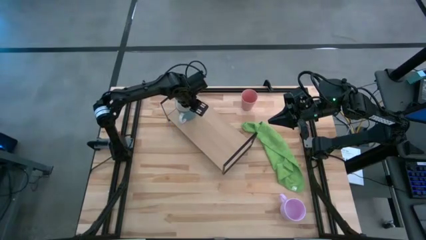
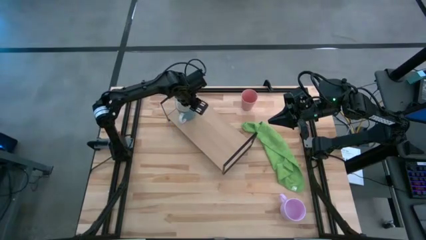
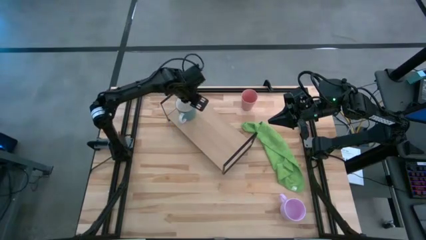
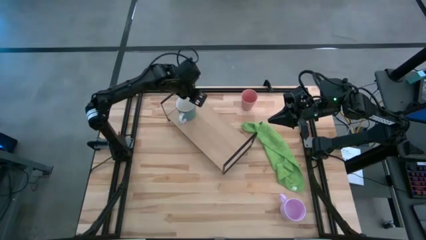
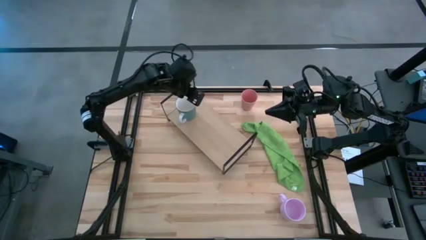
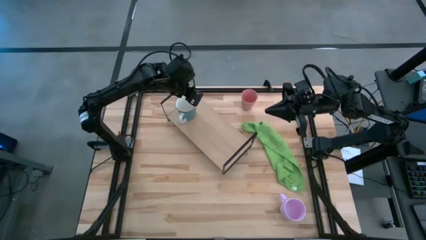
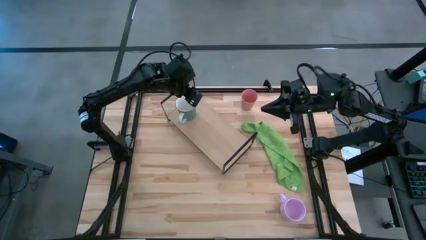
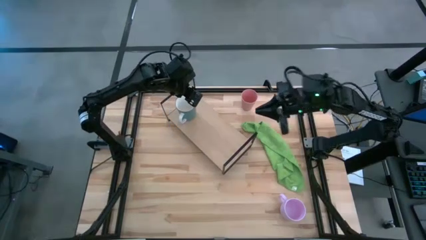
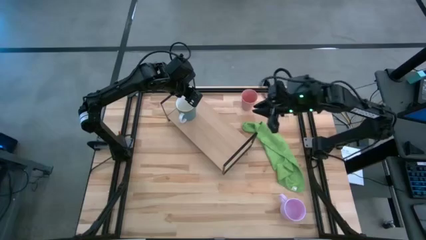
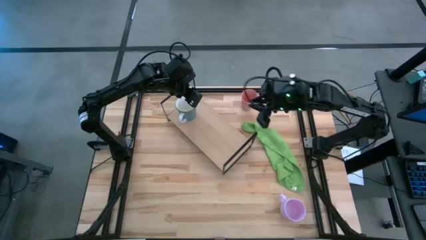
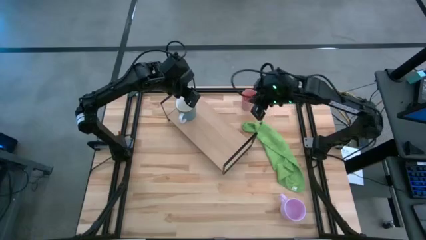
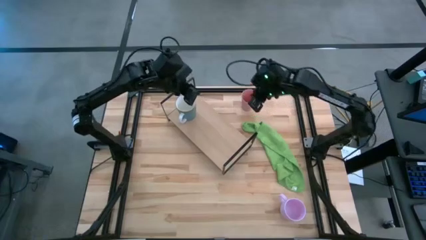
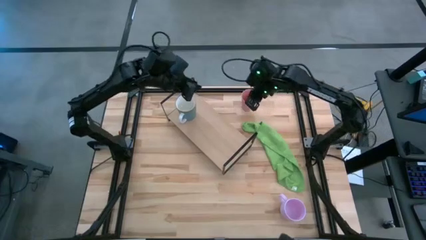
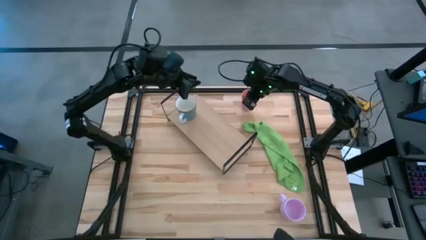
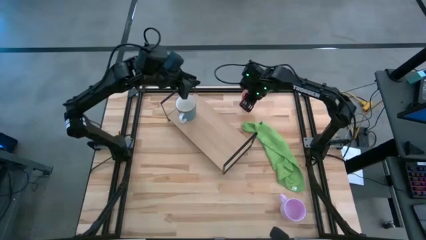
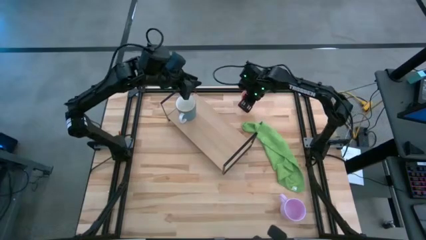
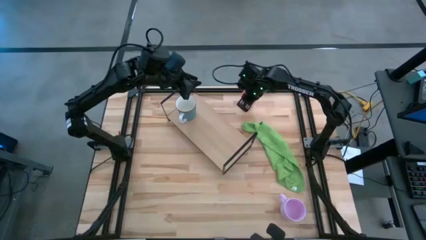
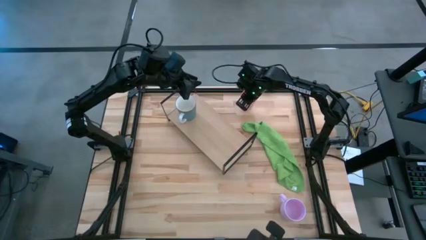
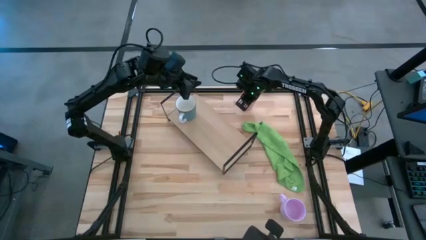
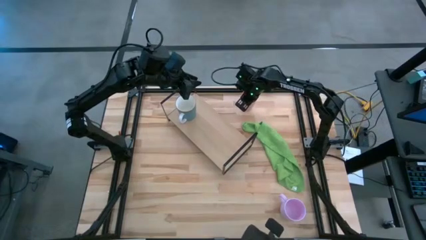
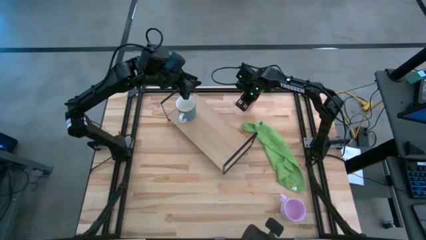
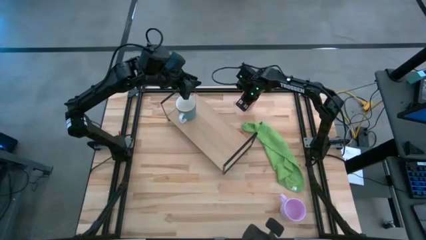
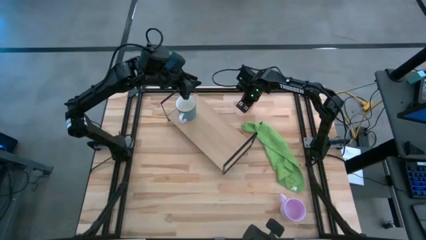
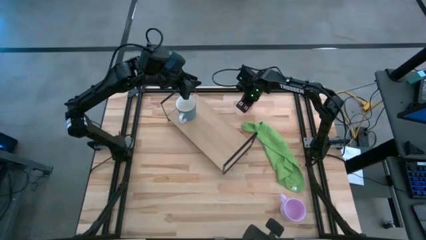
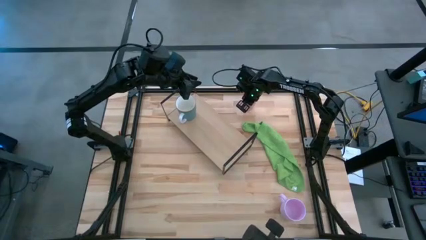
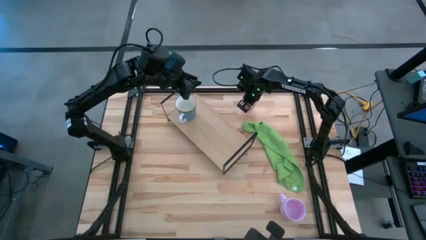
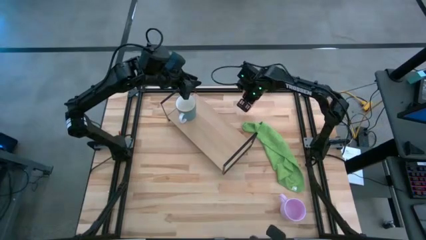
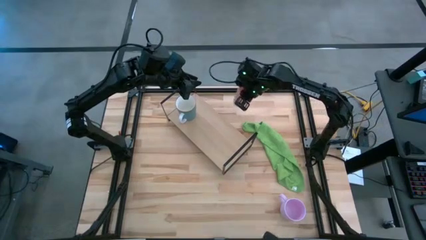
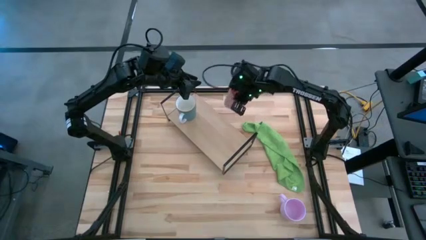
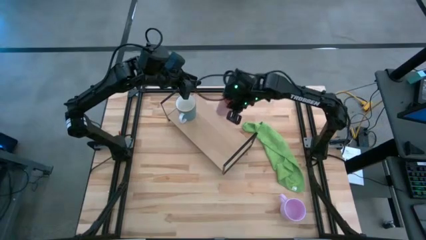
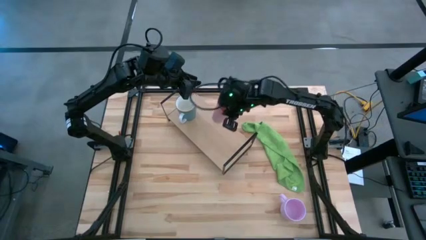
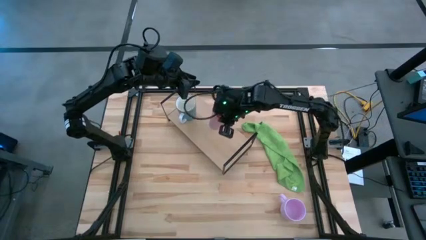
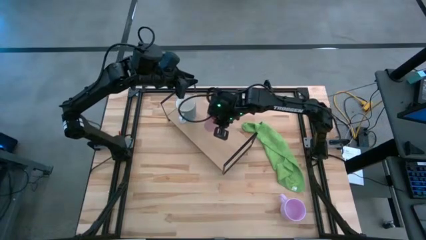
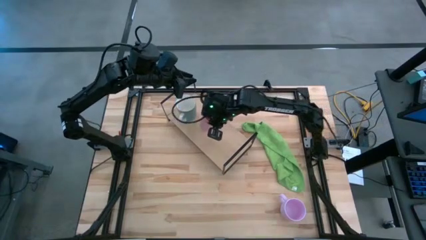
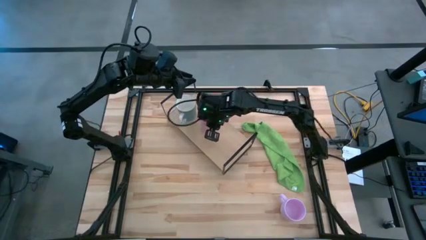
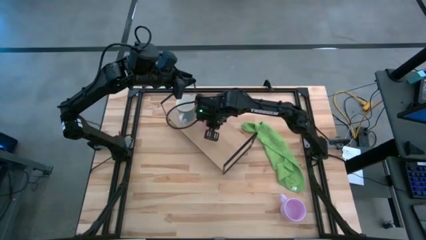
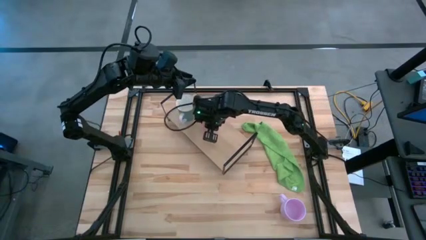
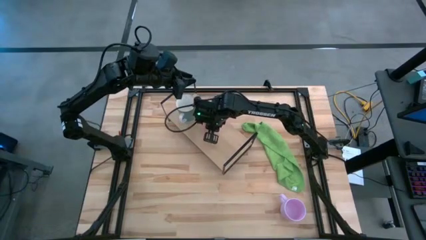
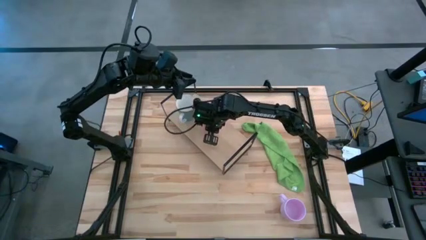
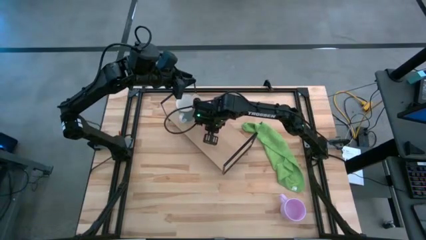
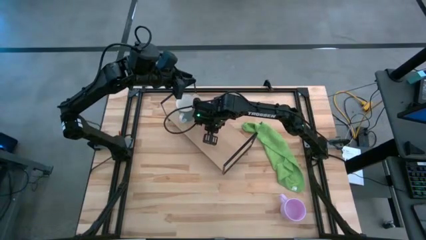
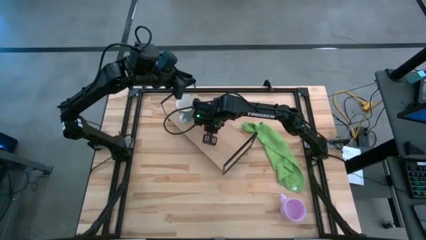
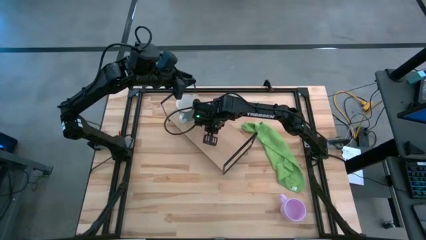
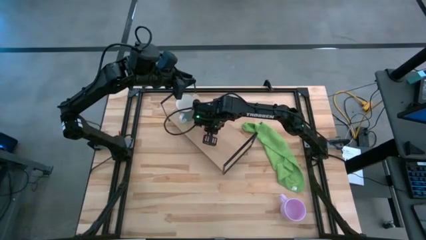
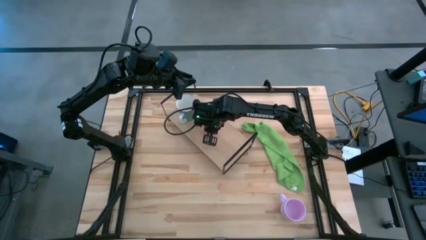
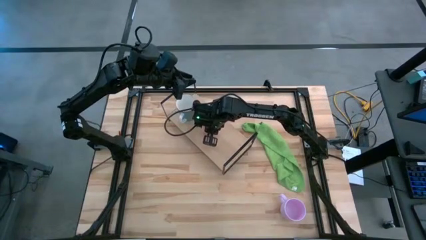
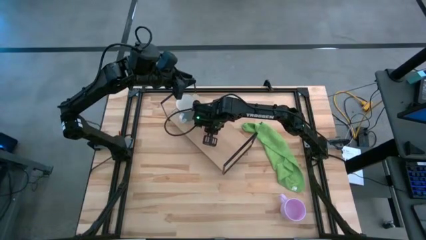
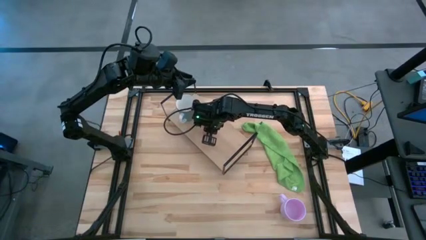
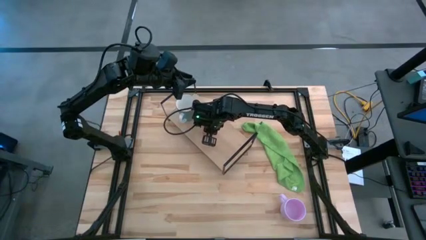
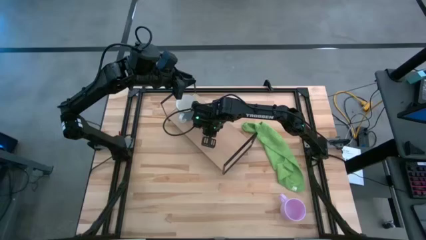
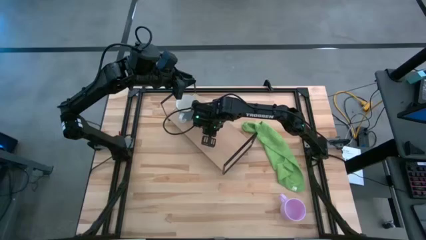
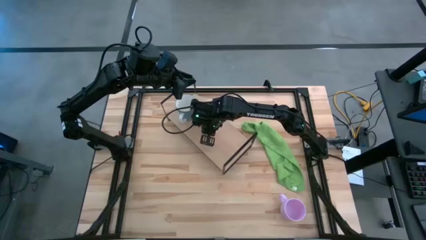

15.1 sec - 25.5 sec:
Task: Stack small to large cups/mugs on shelf
Put the pink cup on the shelf
